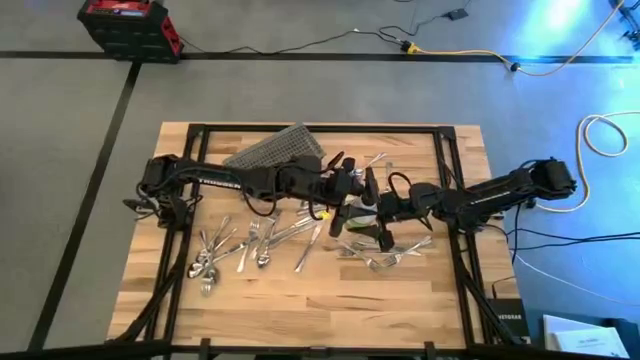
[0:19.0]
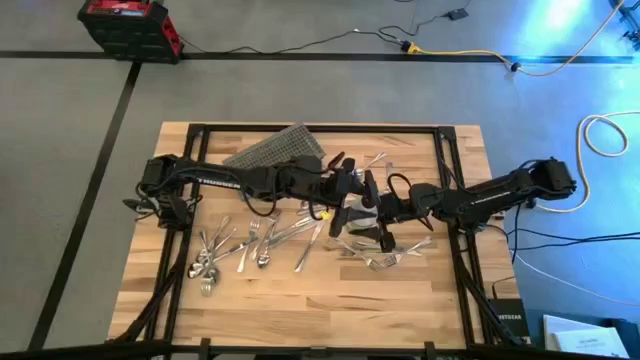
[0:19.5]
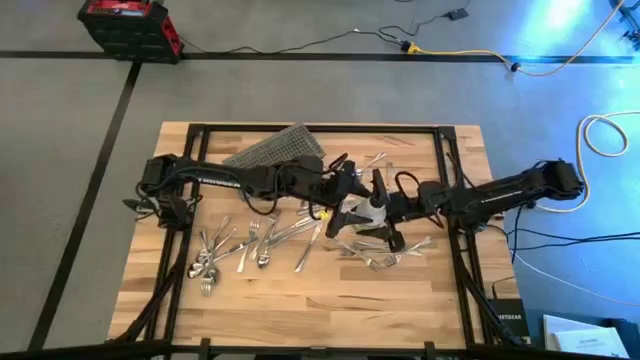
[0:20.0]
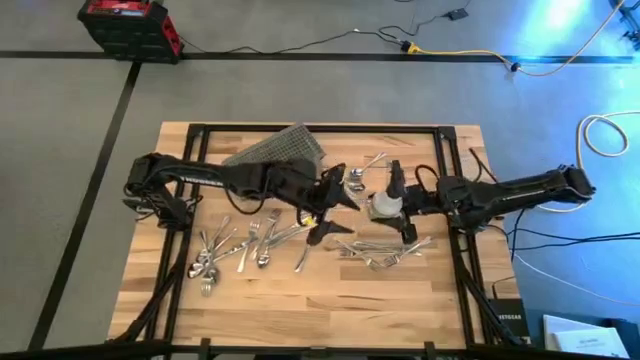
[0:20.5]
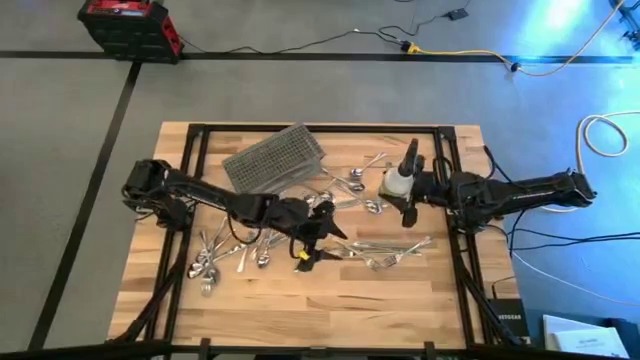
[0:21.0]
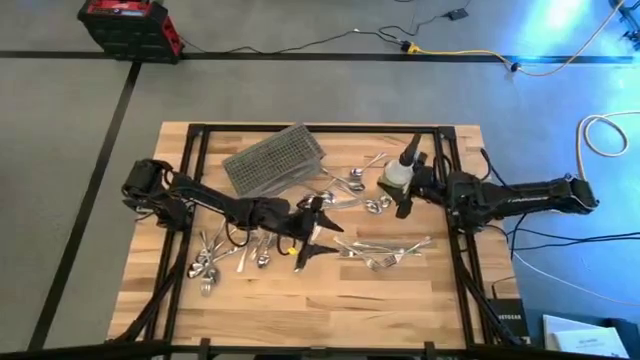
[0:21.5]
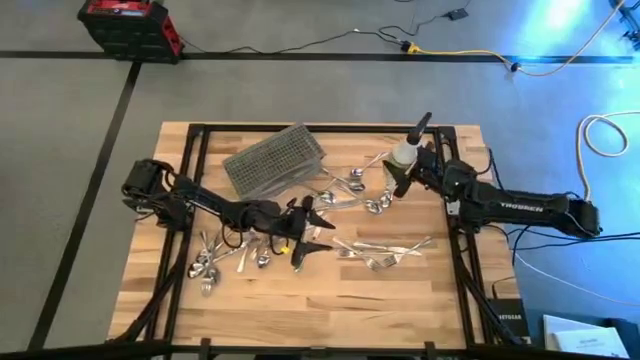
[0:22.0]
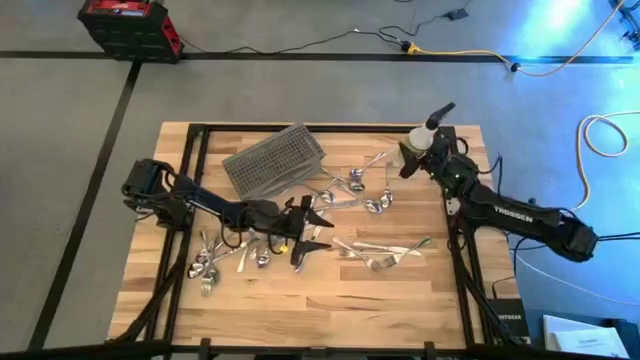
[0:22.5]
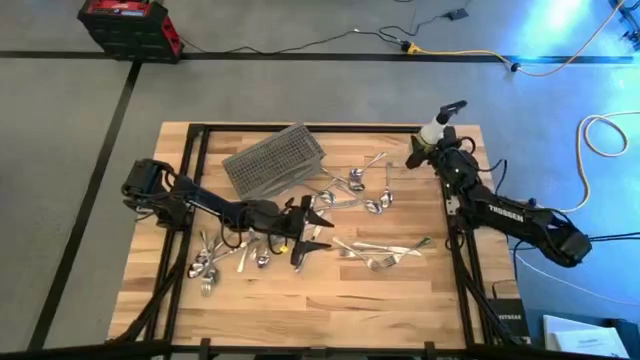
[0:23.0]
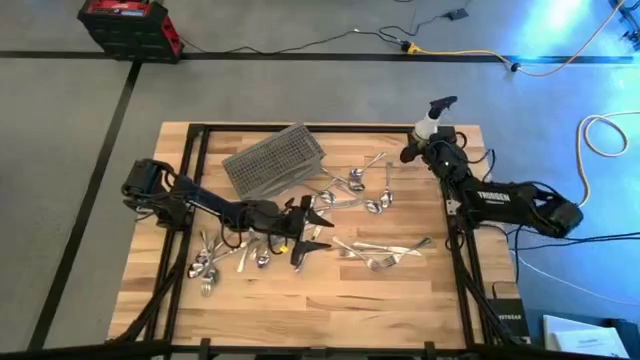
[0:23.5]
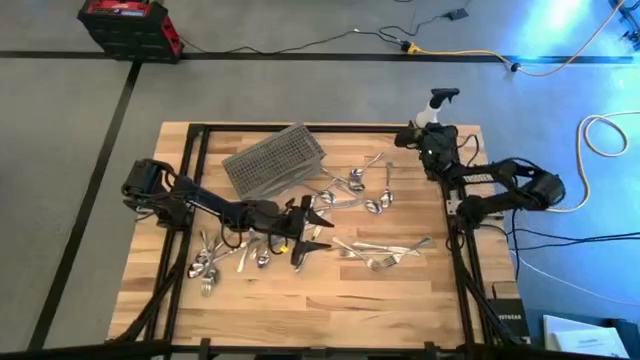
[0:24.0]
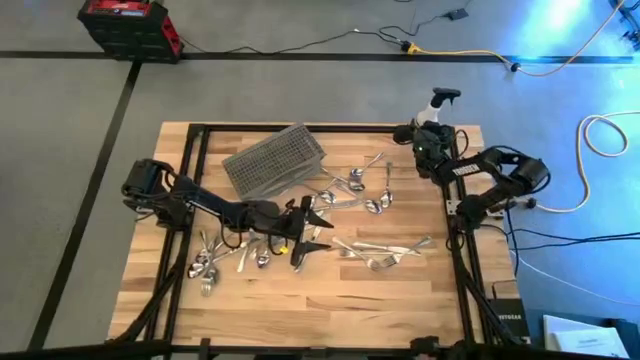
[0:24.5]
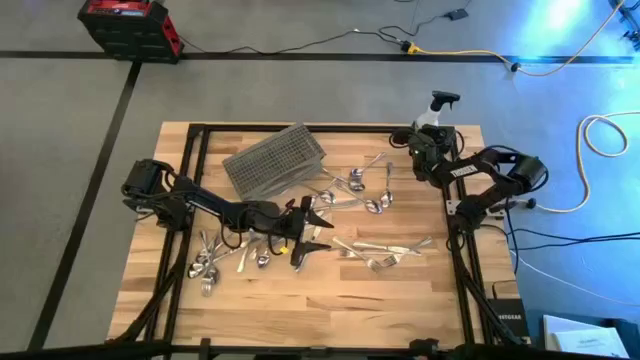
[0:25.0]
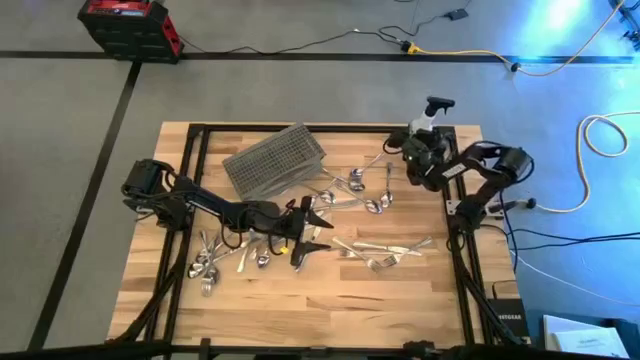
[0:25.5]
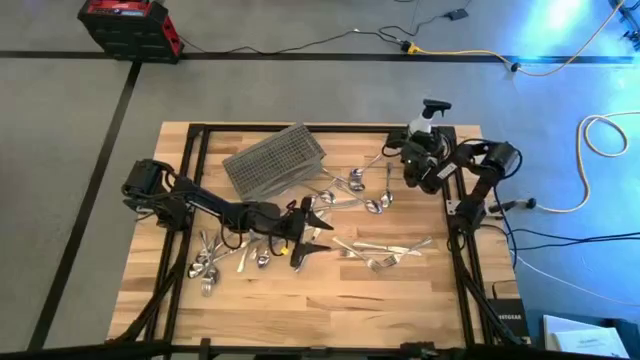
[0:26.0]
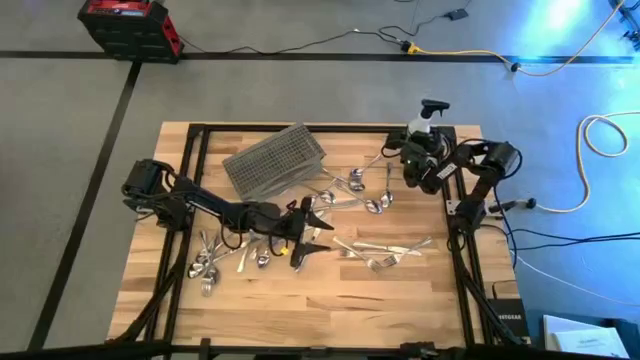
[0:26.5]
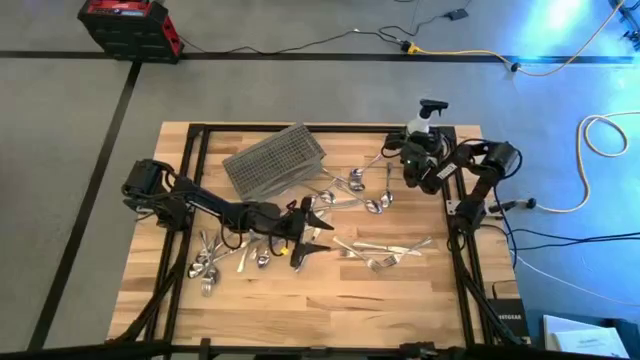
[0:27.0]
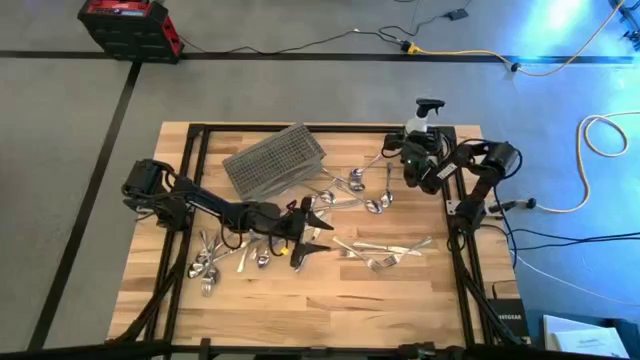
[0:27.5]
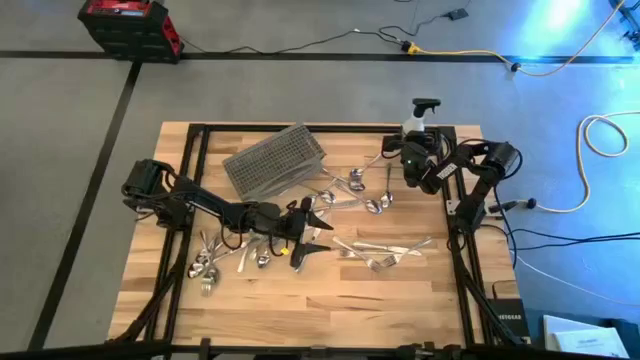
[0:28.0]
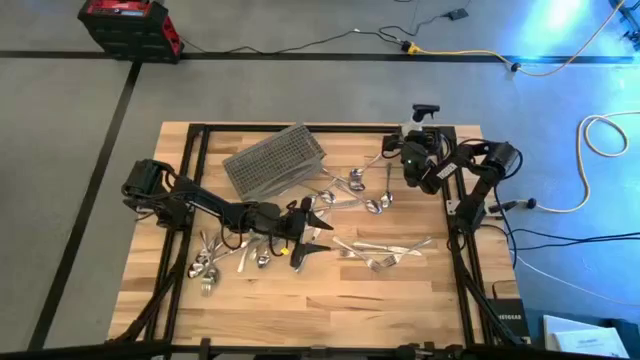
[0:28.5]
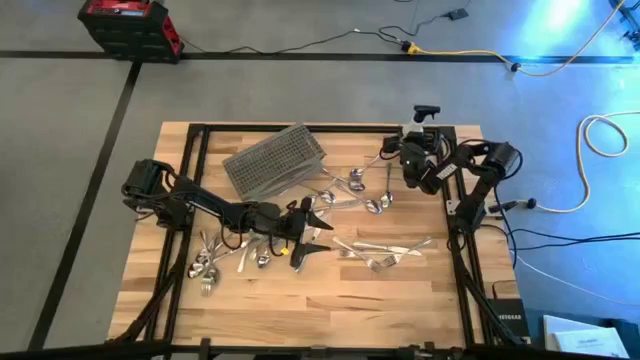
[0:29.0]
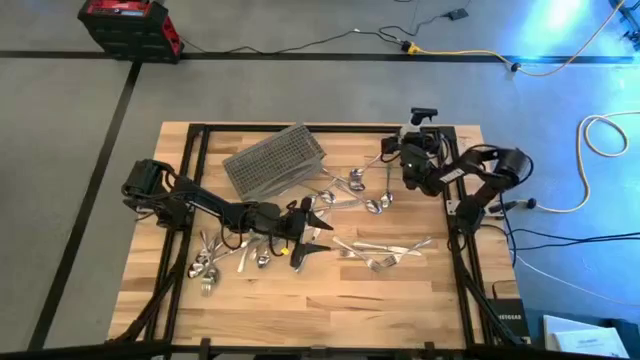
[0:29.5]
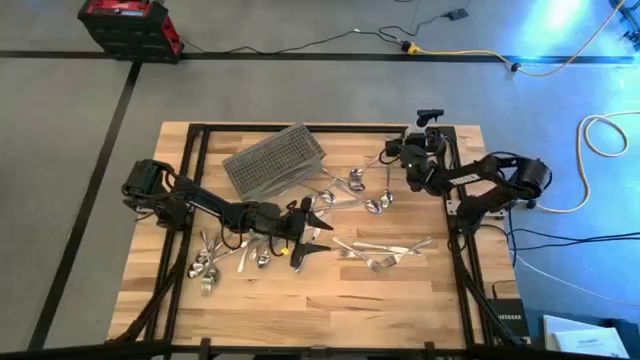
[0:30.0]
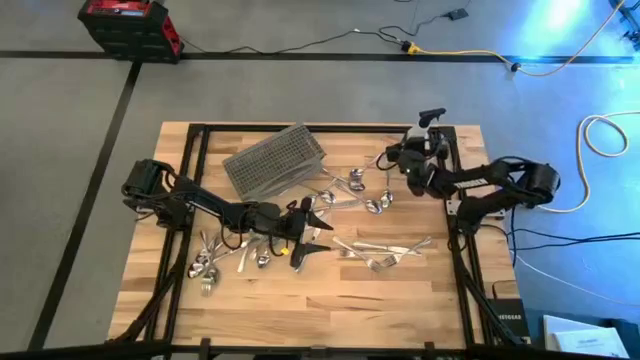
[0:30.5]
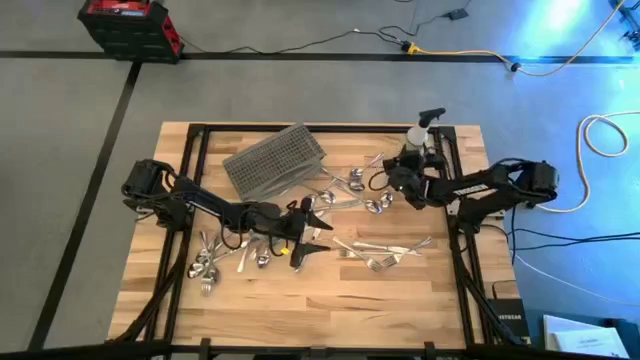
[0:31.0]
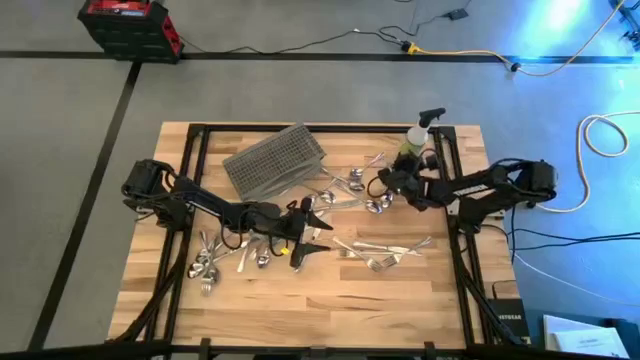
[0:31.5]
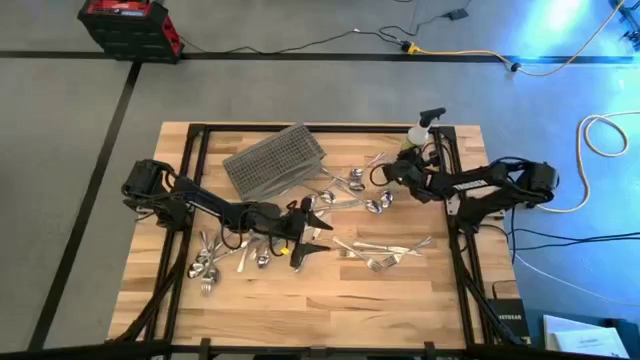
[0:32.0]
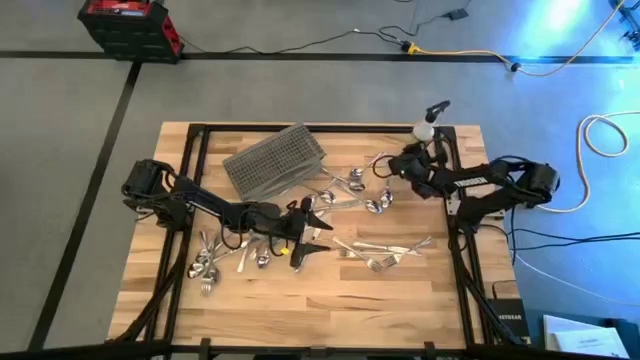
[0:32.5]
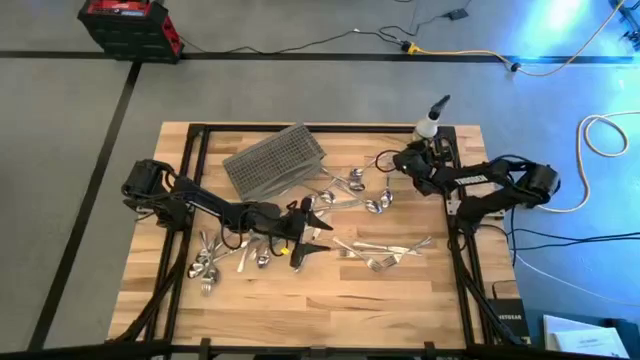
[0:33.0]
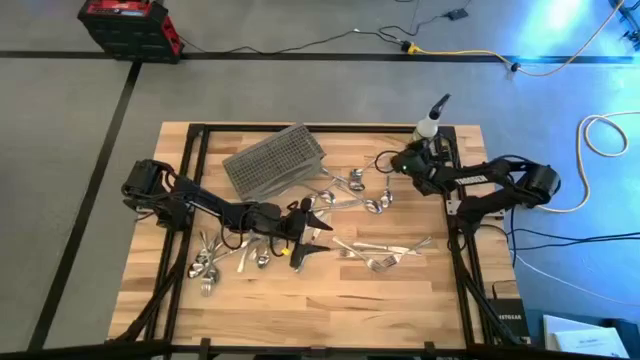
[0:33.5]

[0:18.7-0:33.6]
Task: Sort silverware
Move the white spray bottle to the top right of the table

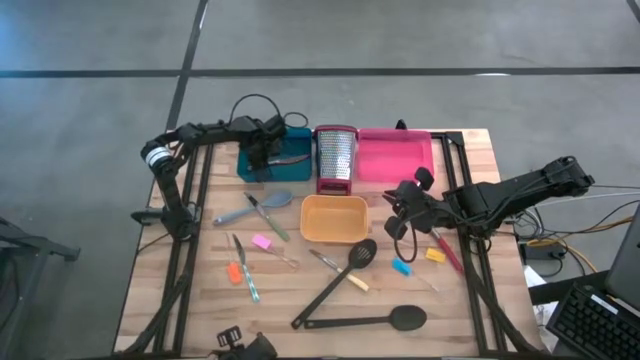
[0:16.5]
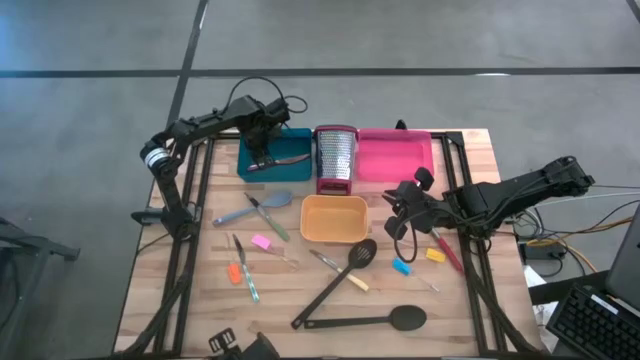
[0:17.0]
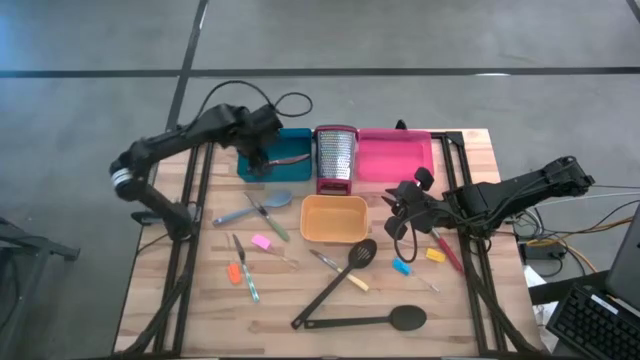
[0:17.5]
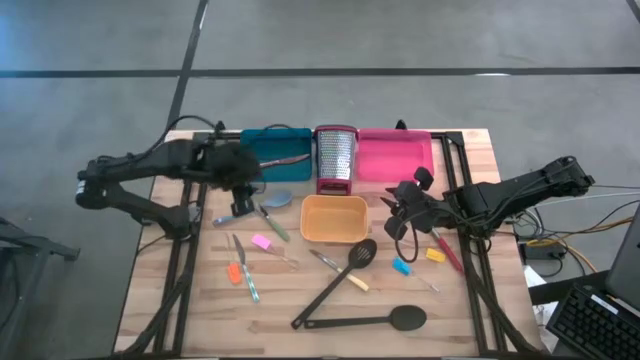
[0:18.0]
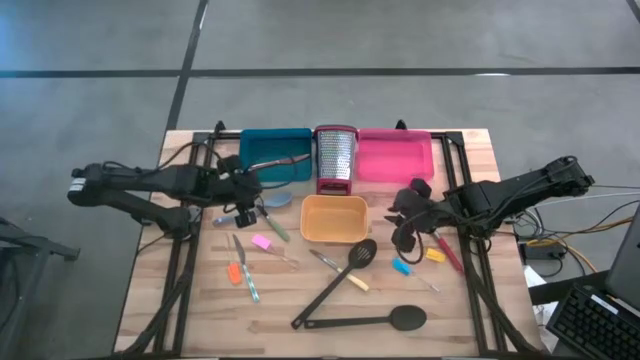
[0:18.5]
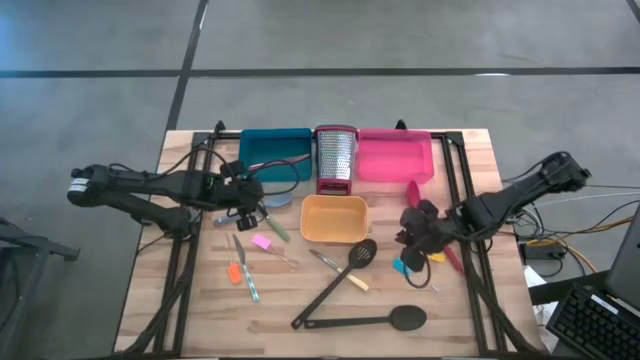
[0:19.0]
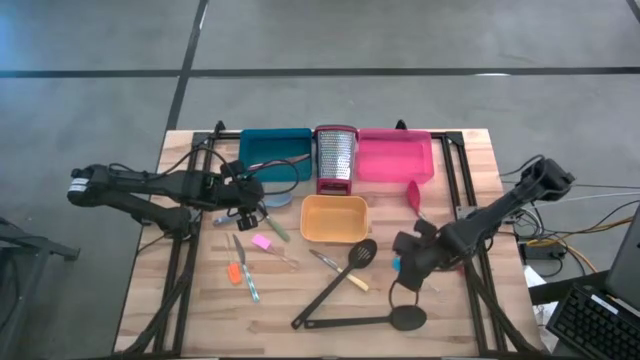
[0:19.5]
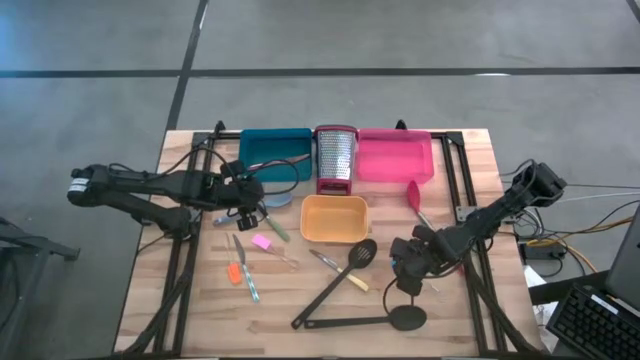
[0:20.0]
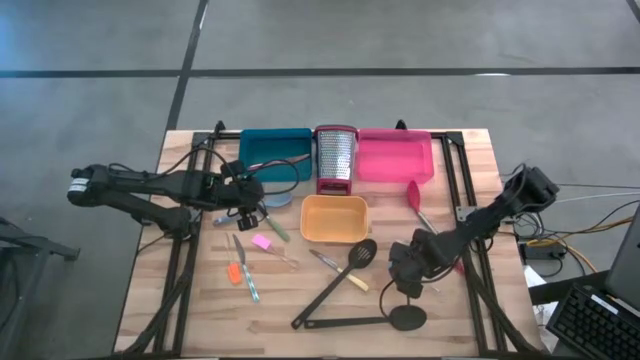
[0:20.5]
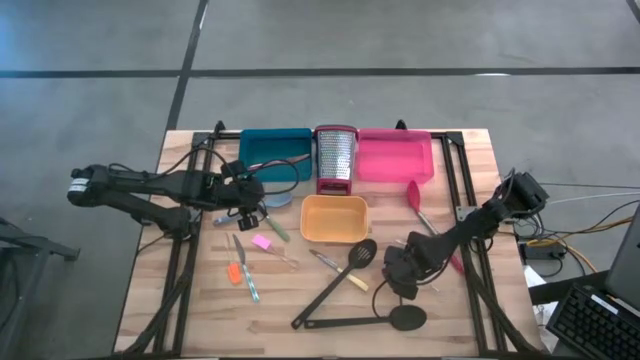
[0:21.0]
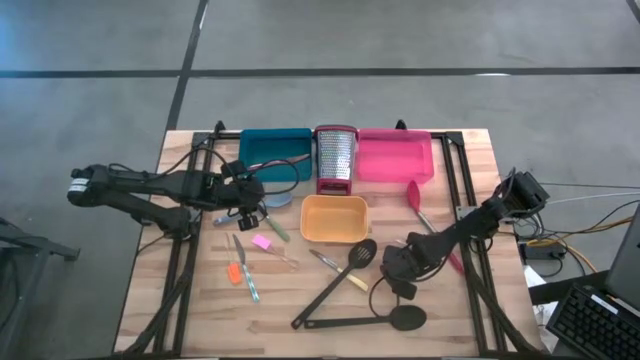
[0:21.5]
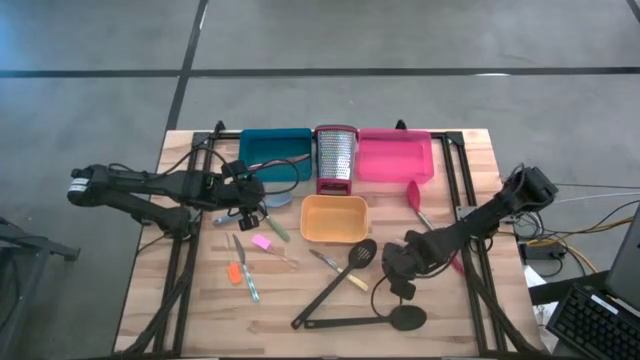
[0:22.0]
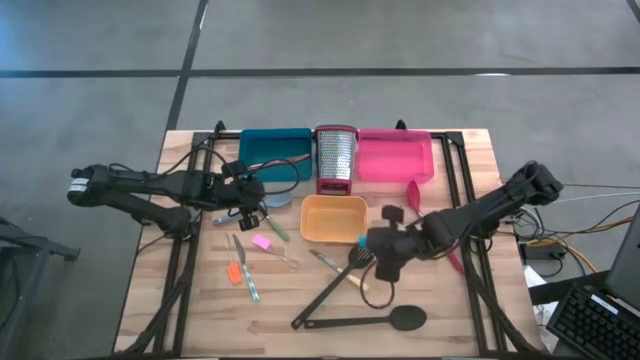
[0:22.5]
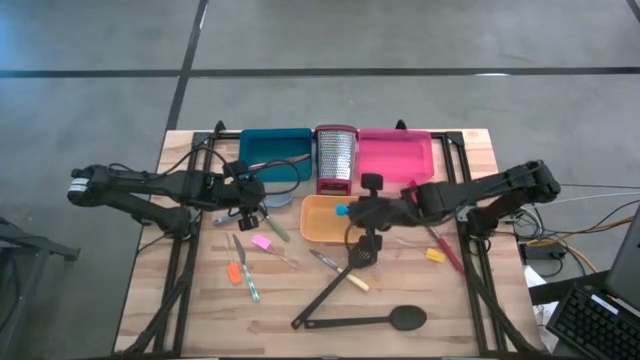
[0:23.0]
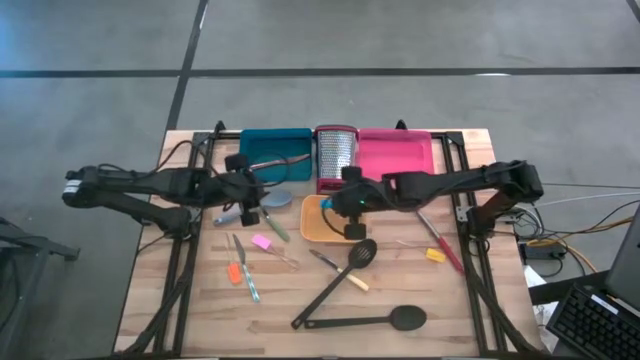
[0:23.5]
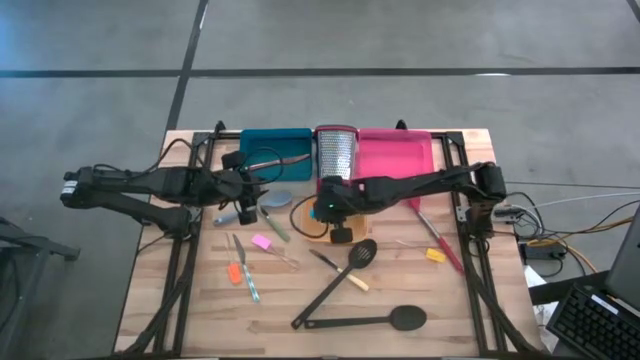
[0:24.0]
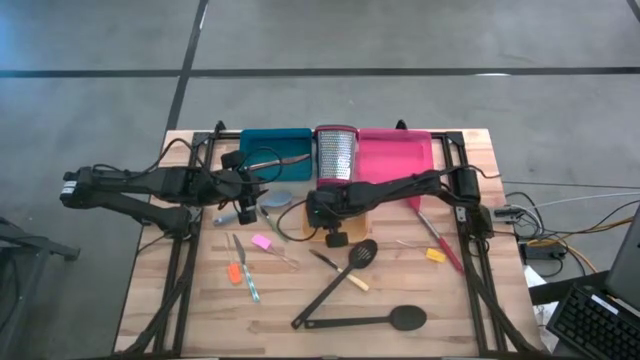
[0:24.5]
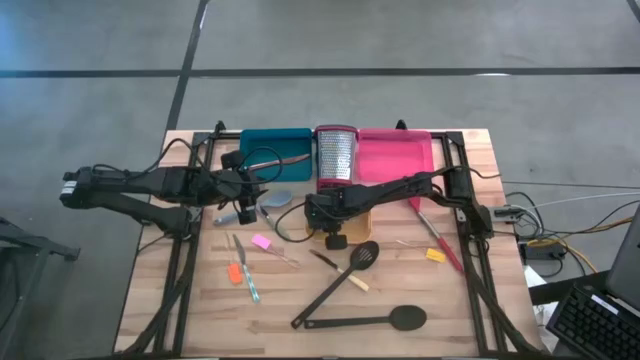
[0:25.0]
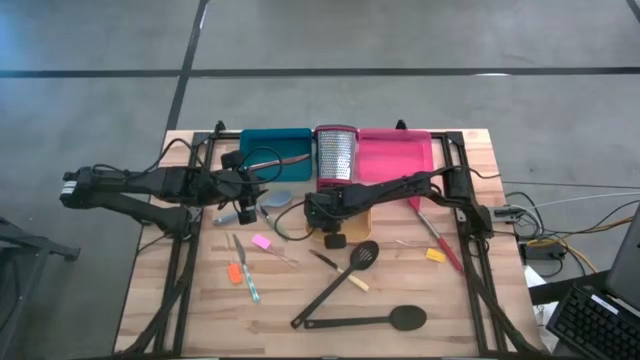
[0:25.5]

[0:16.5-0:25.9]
Task: Pick & Place Kitchen Items
Put the blue spatula into the yellow bin
